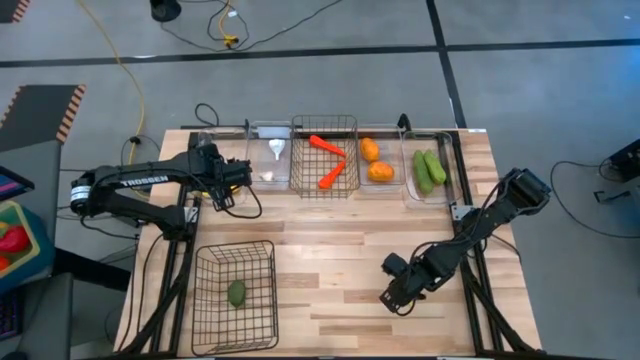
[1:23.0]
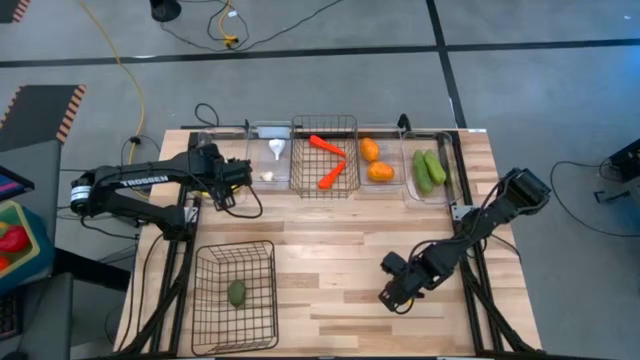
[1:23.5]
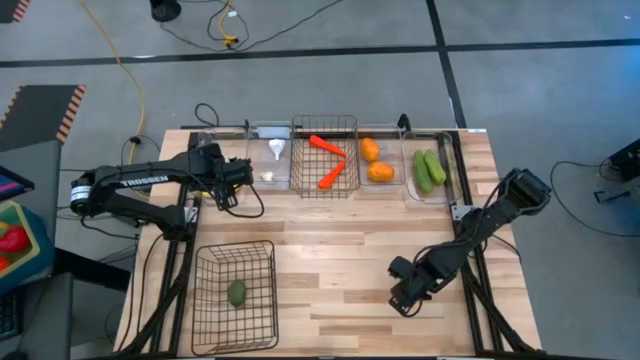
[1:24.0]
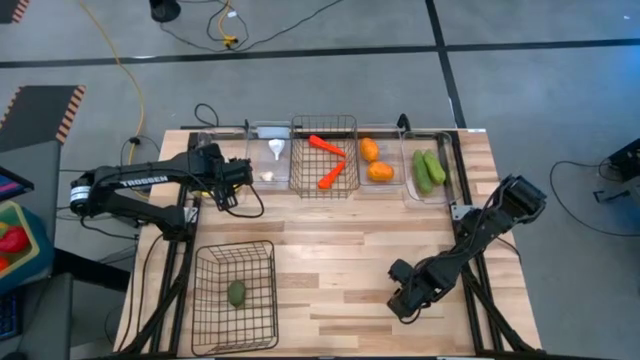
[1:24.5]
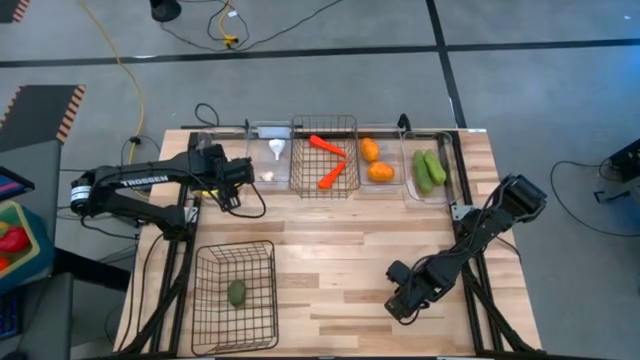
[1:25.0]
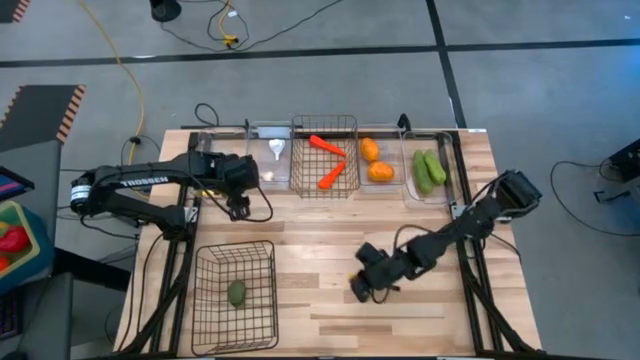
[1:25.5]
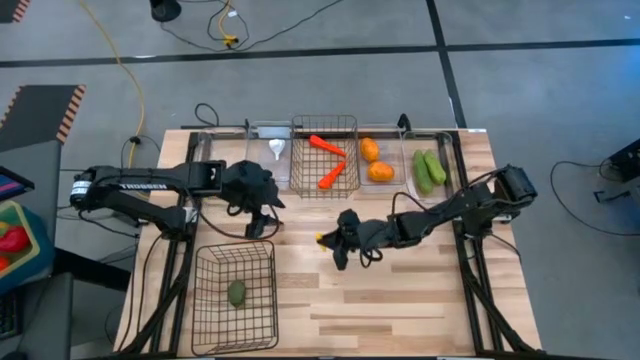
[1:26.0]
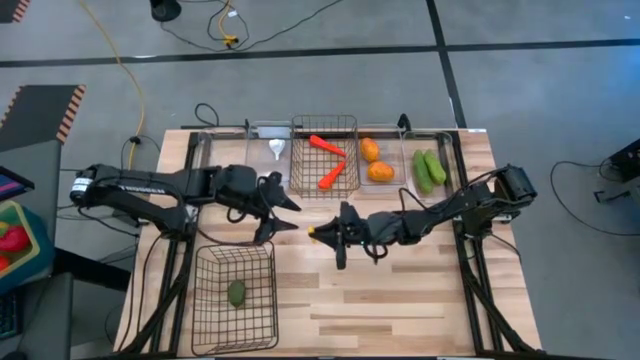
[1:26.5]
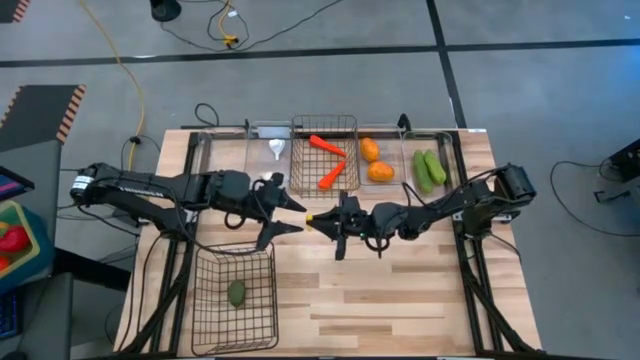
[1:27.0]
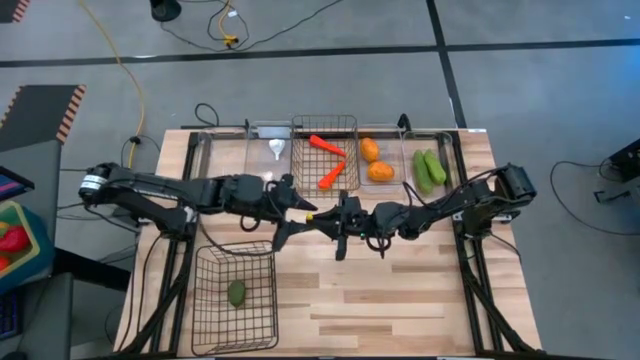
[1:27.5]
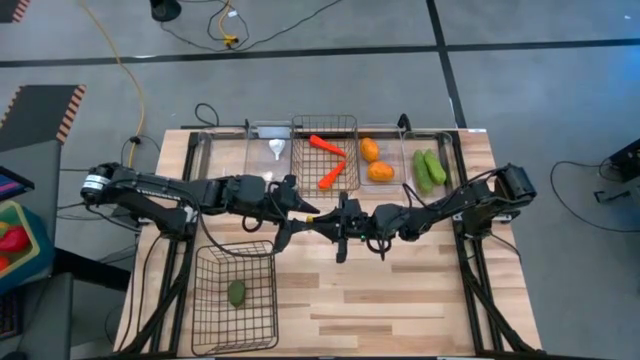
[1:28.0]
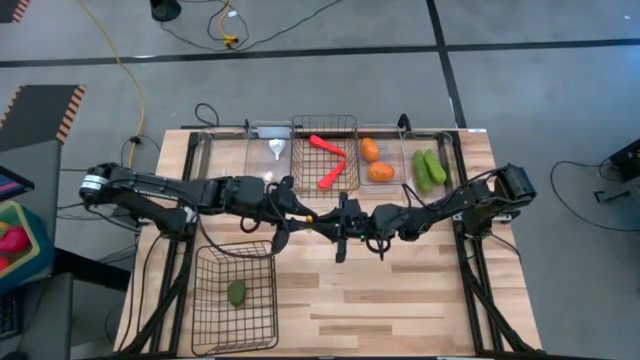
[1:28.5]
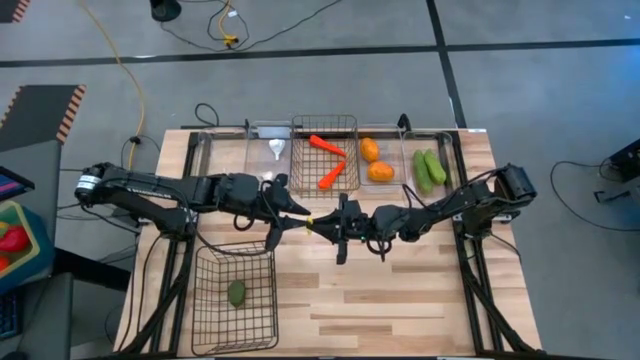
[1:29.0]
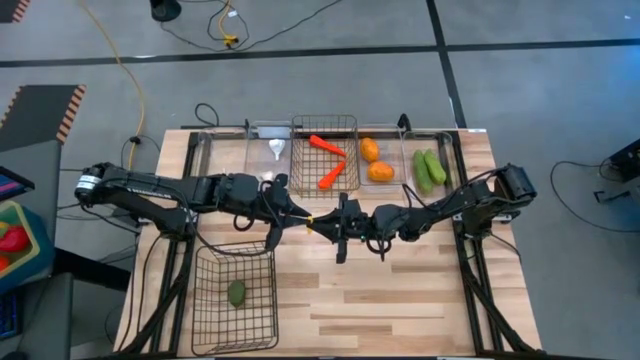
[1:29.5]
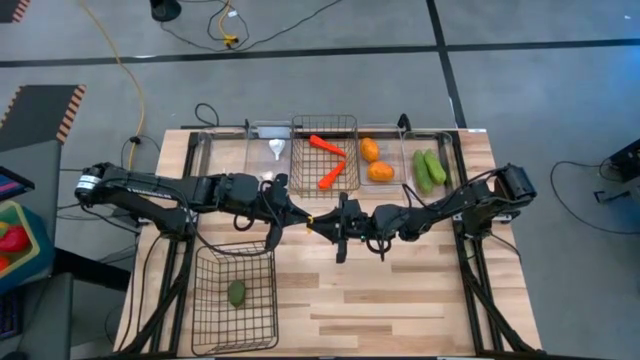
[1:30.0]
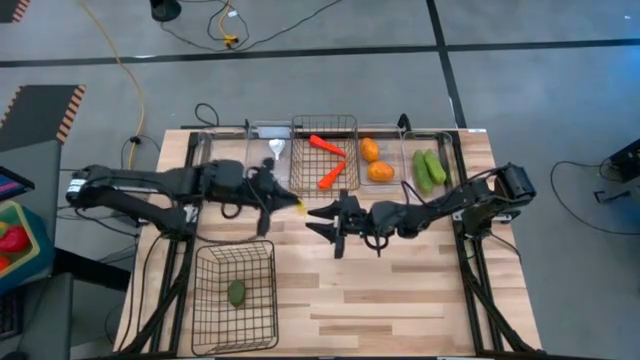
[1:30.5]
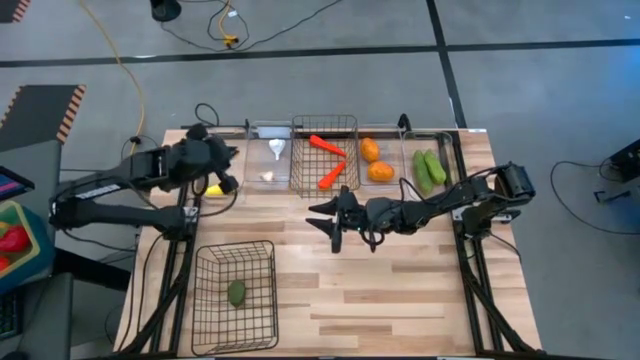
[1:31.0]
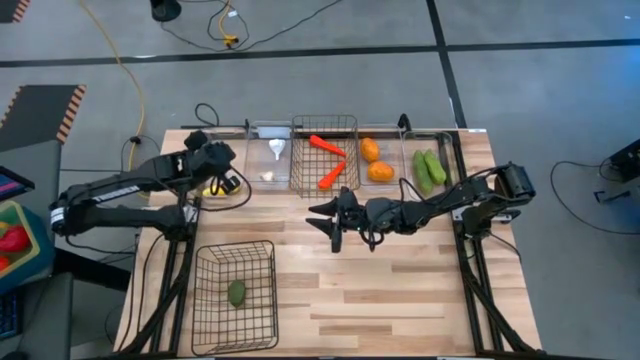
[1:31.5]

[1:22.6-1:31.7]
Task: Sort produce into baskets
Put the yellow corn into the left transparent bin

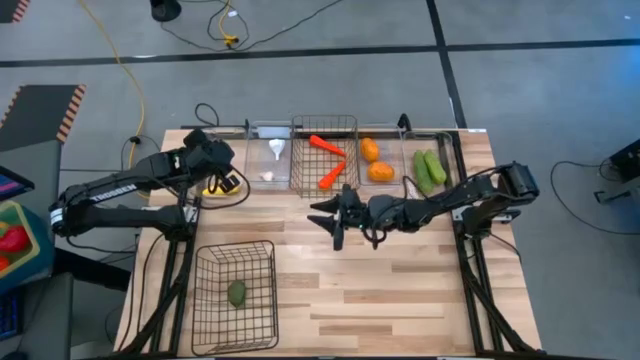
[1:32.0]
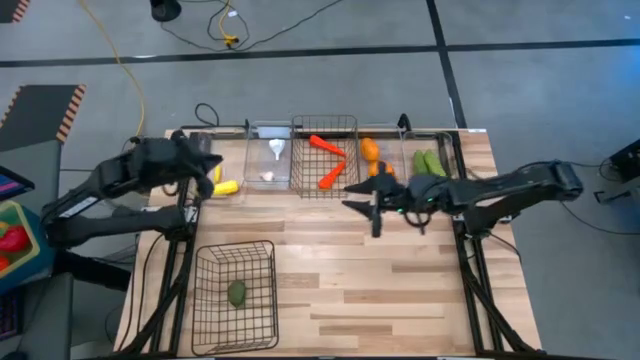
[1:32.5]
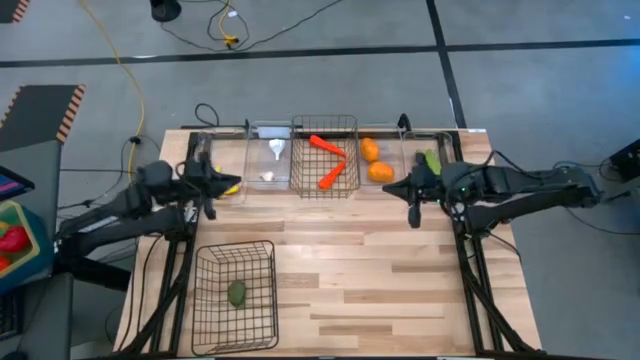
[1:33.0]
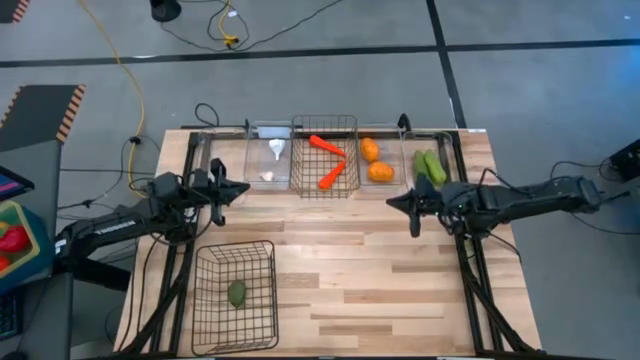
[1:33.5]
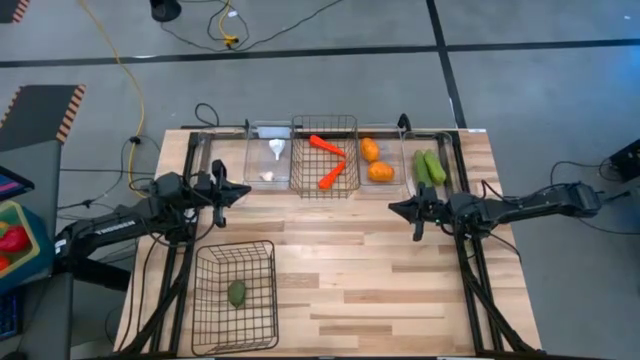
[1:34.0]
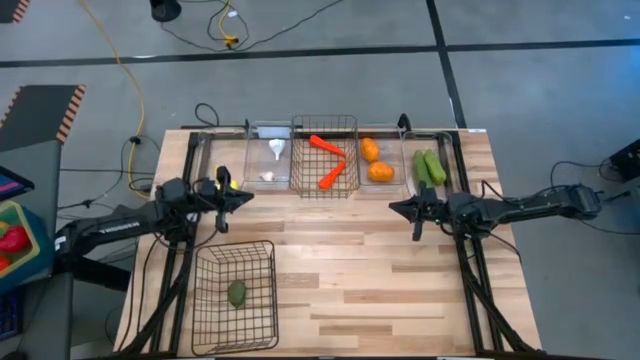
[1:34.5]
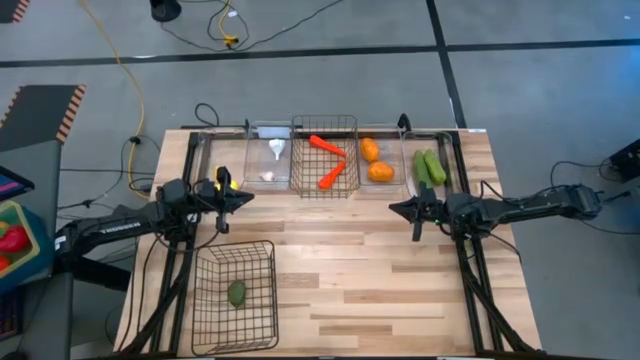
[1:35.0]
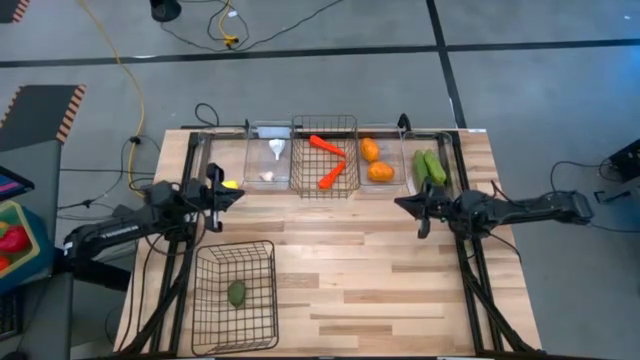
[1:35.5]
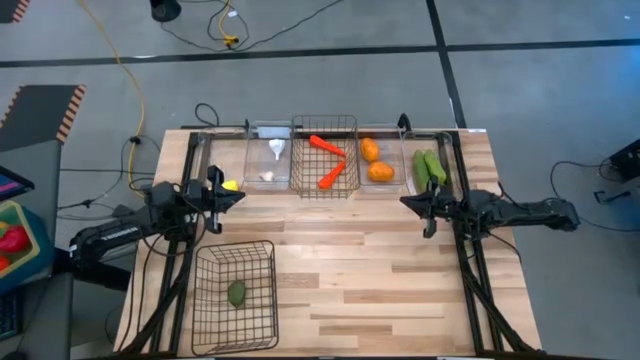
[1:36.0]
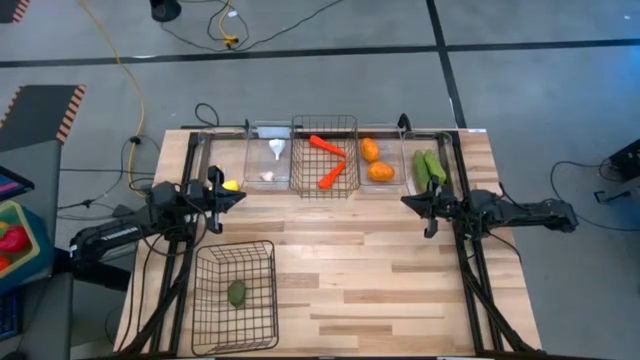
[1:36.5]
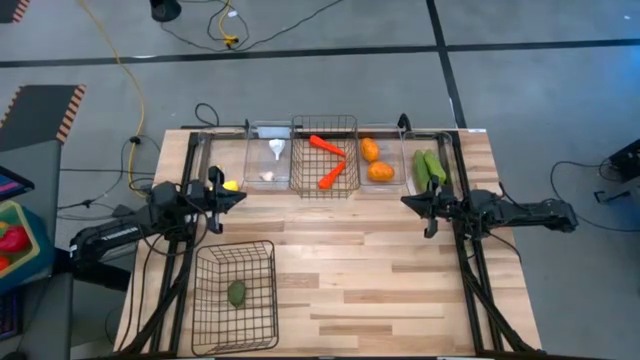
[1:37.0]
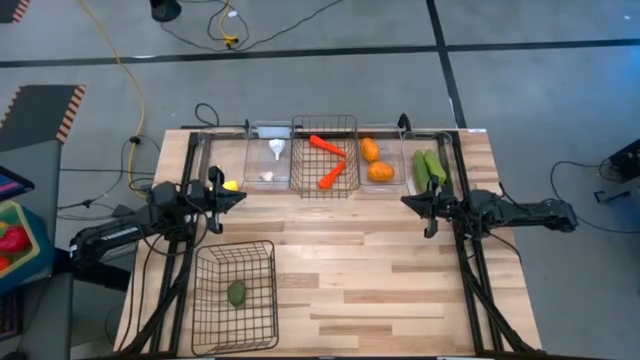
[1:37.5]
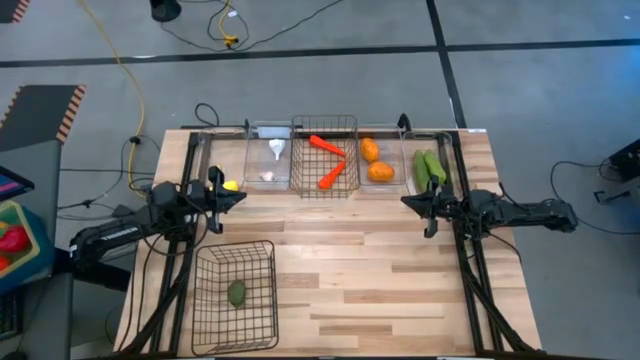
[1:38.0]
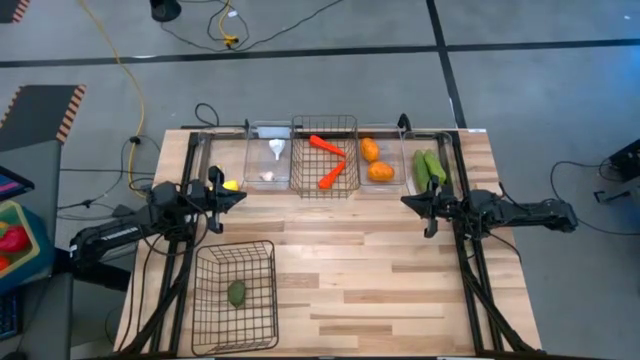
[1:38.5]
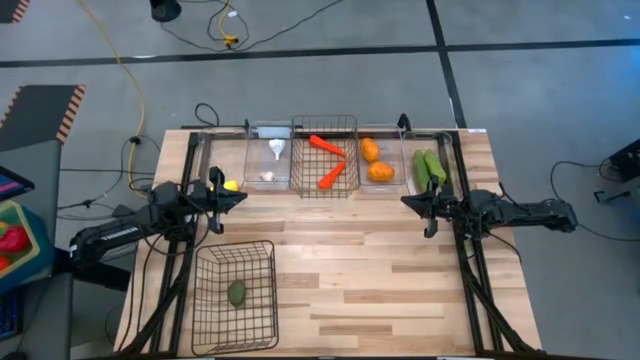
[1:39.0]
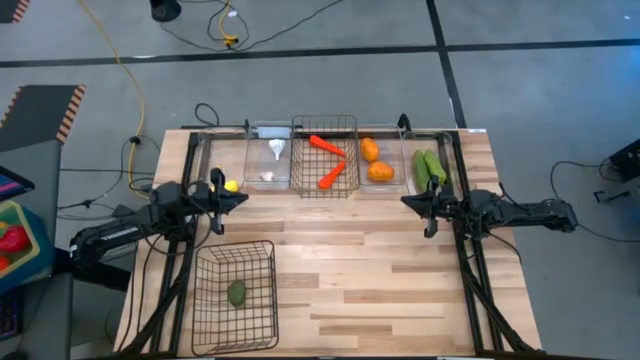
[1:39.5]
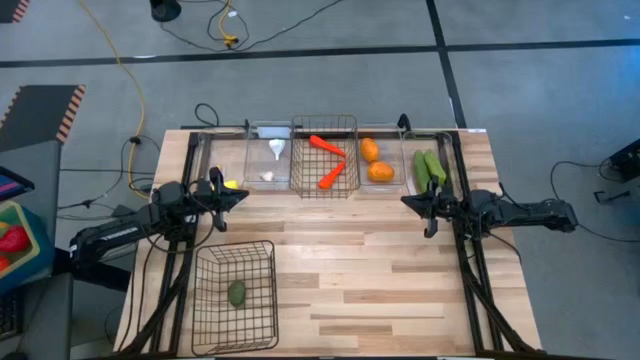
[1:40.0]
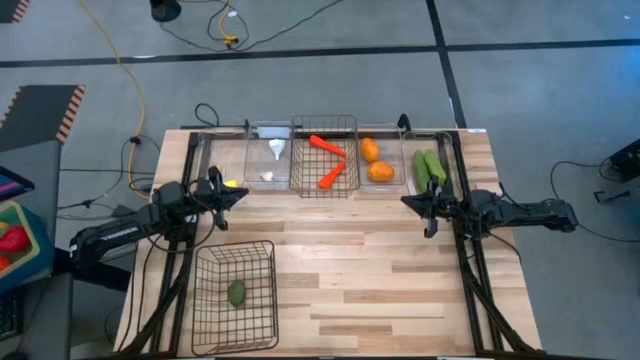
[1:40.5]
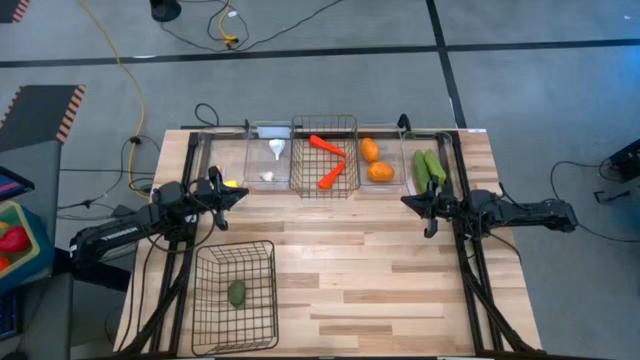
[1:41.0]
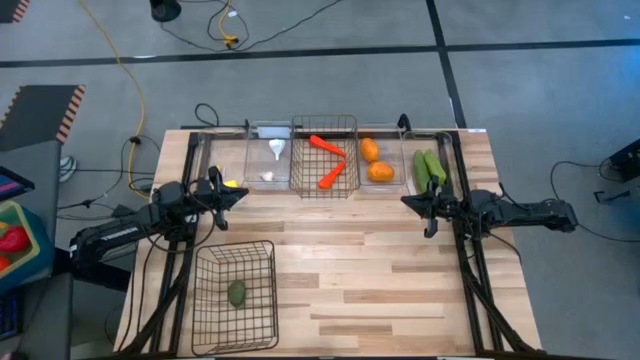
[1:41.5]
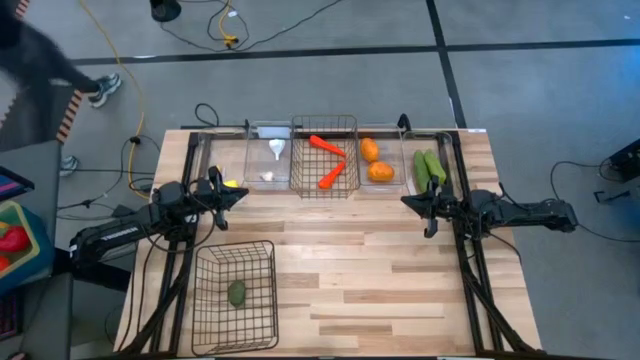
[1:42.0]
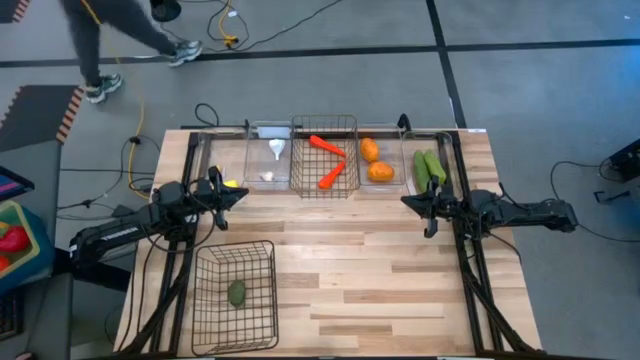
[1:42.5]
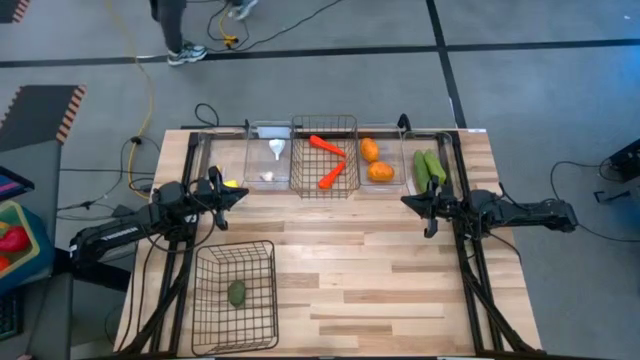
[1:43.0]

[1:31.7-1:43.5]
Return to Home Position

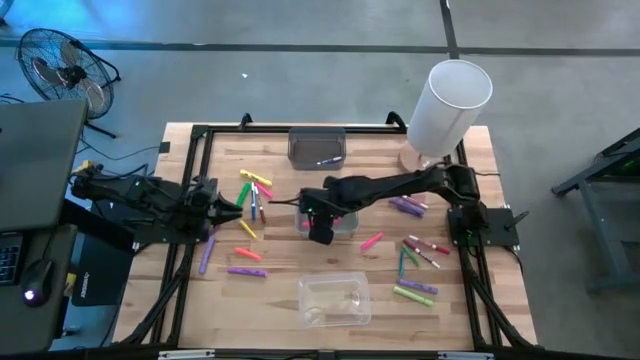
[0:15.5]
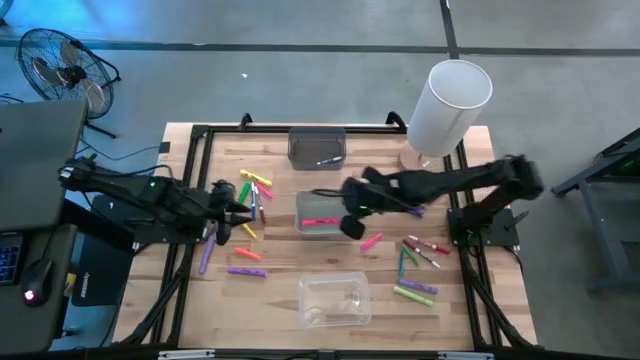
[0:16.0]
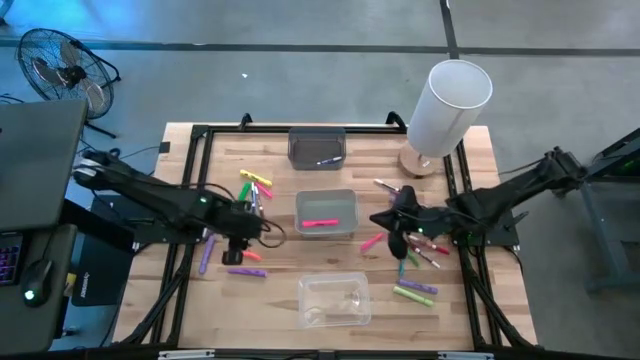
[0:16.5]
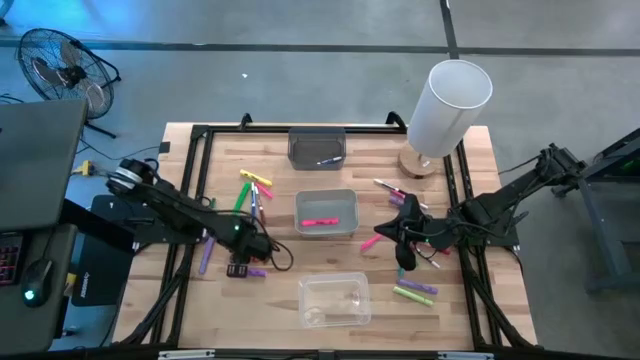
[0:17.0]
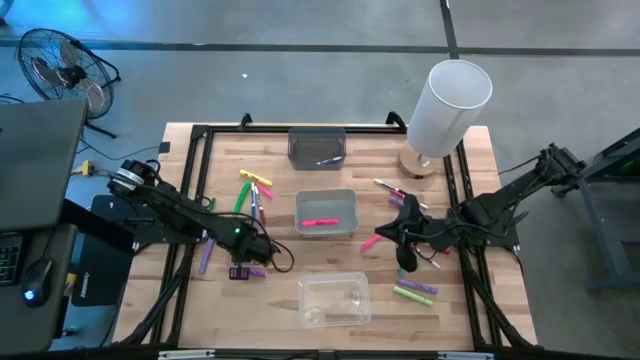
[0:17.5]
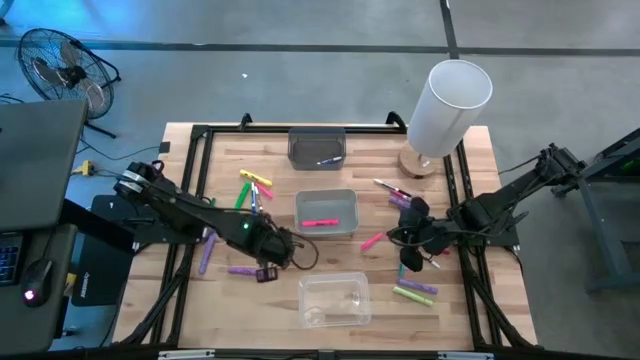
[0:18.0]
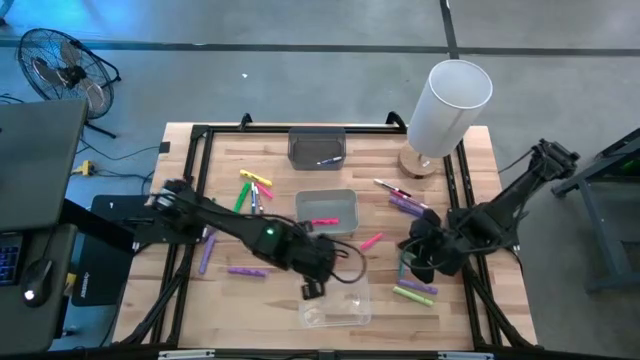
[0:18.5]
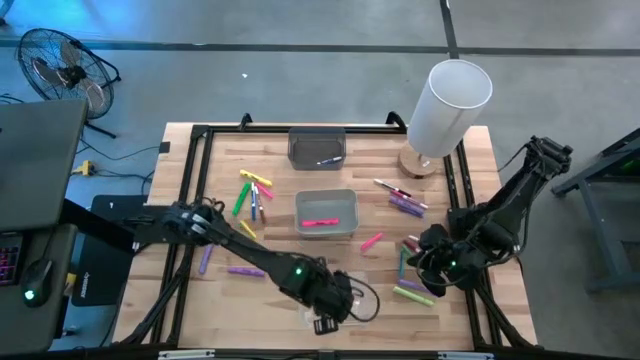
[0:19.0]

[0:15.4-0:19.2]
Task: Pick & Place Markers
Put the orange pen into the transparent bin
